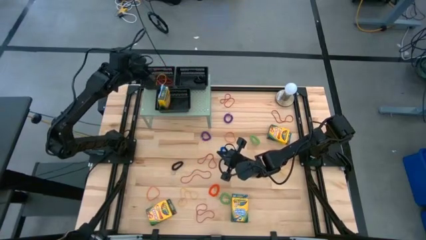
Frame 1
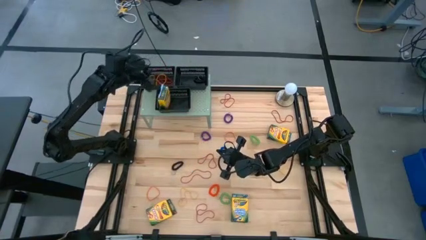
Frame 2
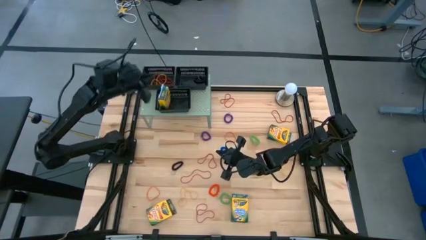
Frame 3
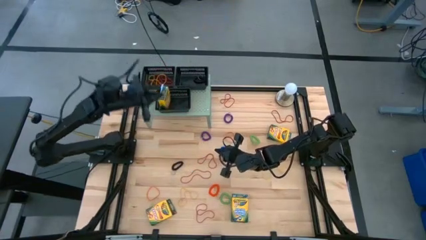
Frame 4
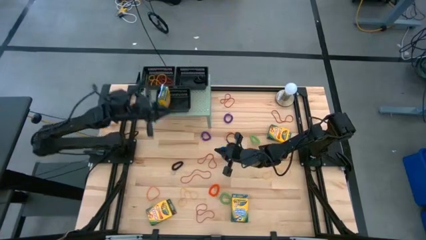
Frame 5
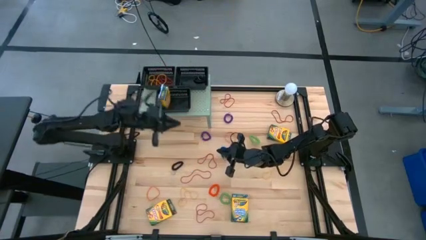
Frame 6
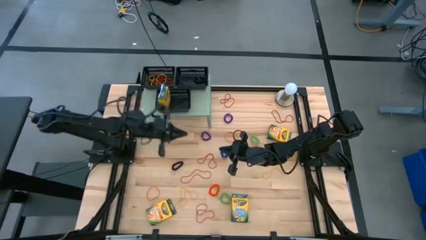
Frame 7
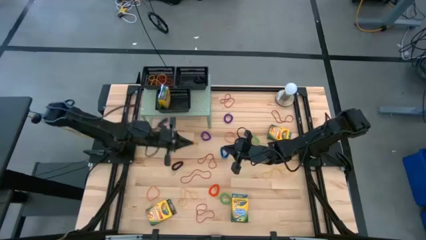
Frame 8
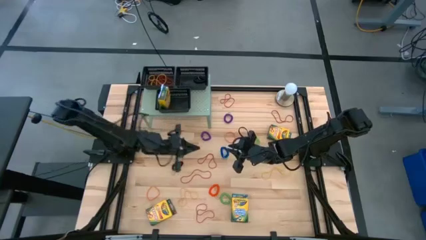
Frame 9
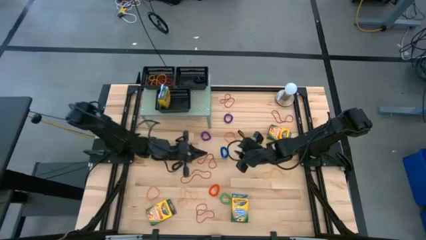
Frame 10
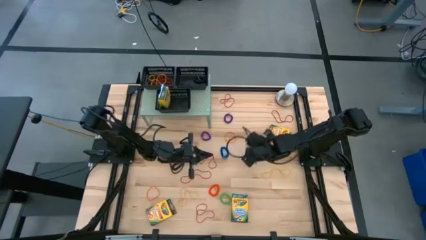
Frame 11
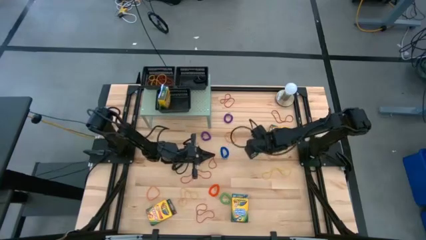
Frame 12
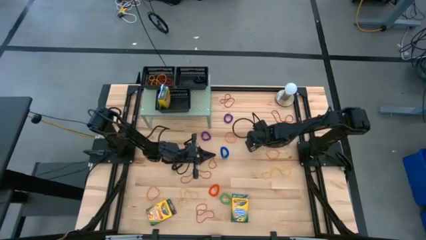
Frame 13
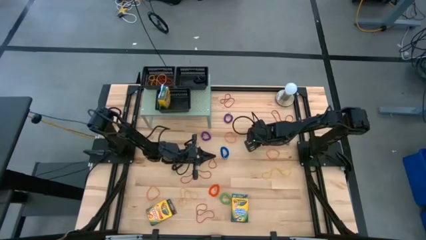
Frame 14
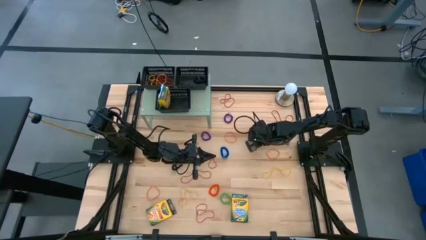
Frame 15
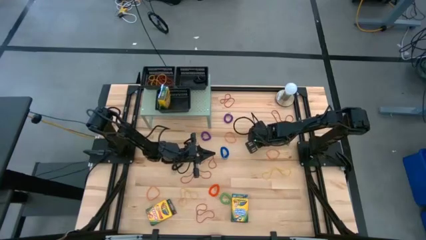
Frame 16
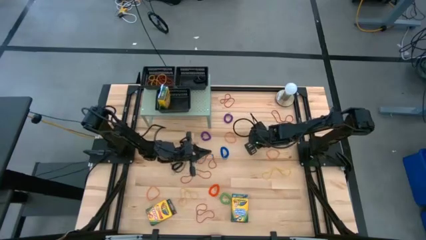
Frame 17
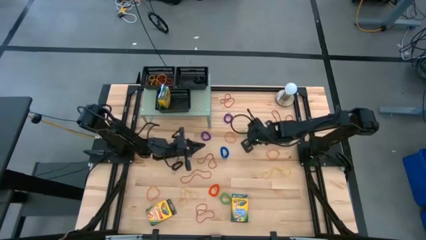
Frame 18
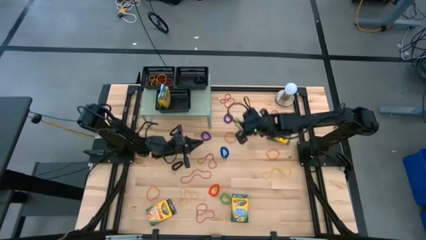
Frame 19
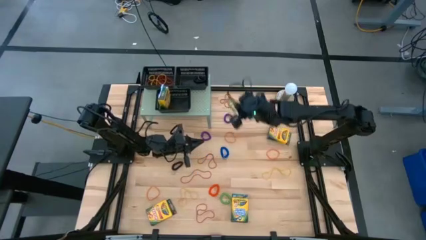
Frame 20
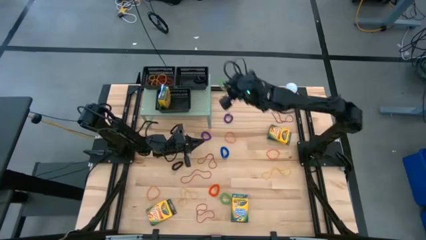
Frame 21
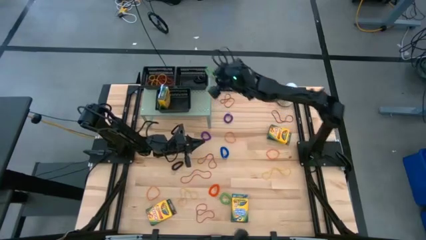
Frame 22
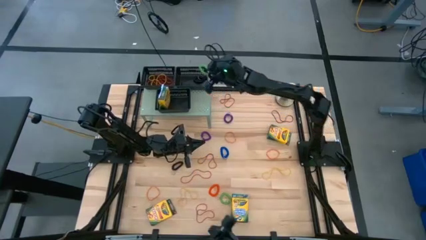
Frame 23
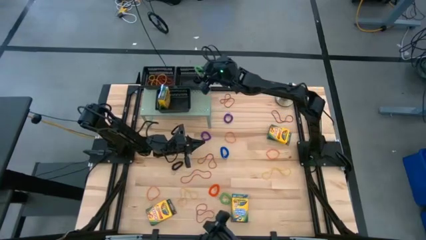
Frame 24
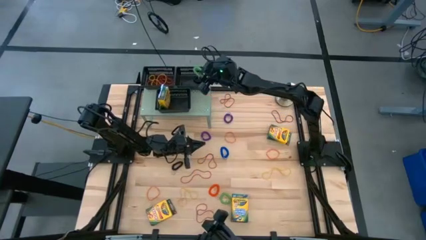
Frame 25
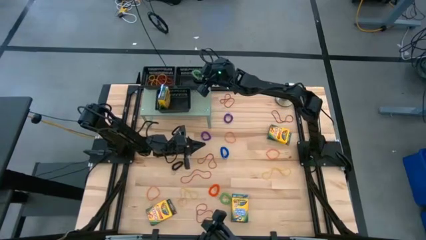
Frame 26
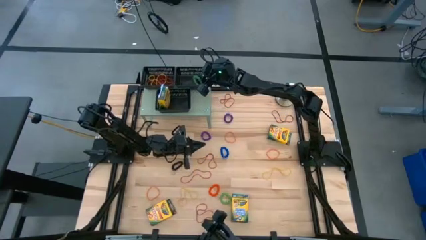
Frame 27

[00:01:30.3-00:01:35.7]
Task: Pick & Place Office Desk Supplies
Put the green spring keychain into the top right black bin on the shelf

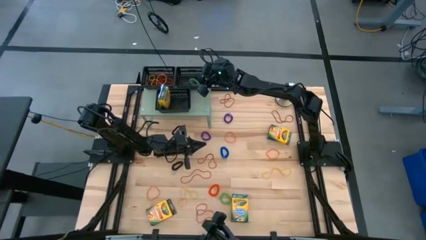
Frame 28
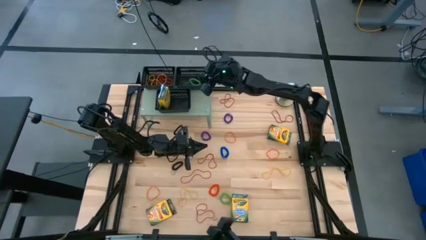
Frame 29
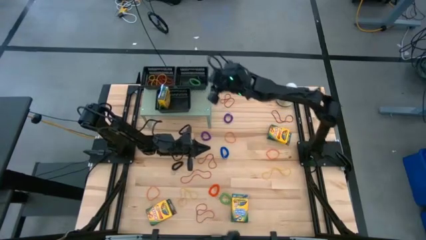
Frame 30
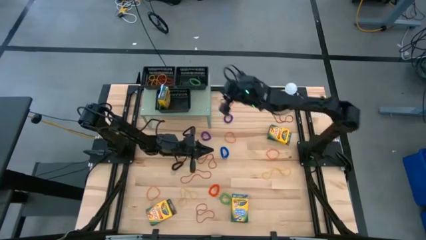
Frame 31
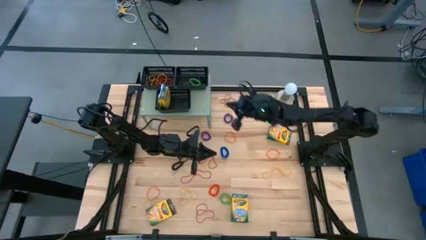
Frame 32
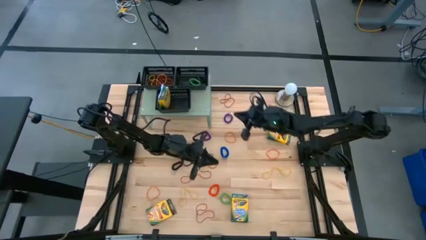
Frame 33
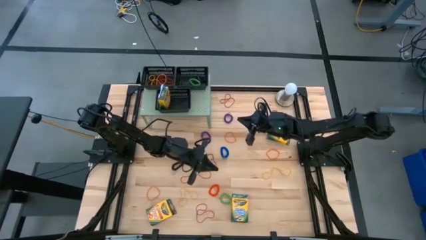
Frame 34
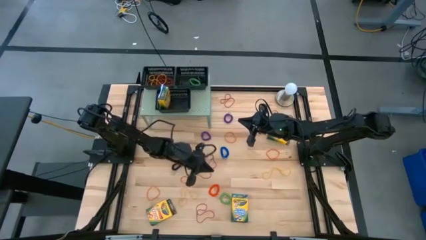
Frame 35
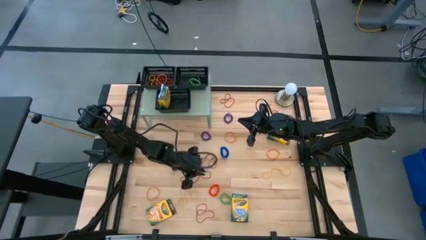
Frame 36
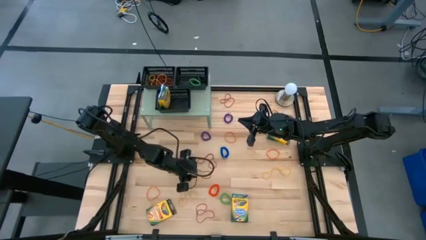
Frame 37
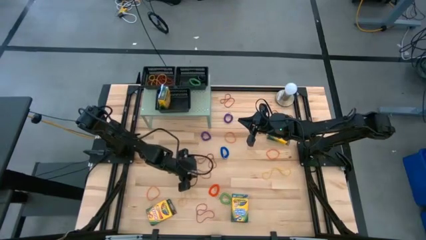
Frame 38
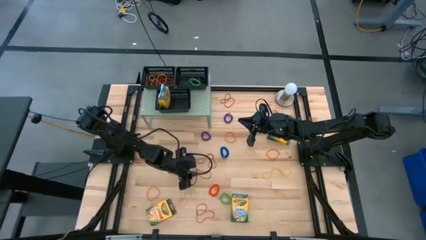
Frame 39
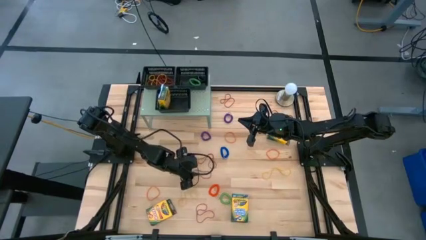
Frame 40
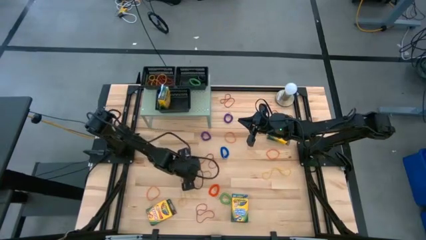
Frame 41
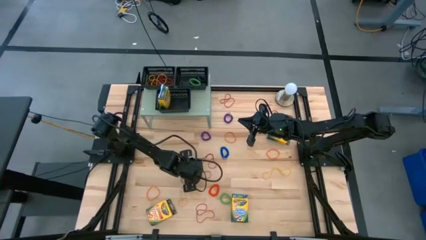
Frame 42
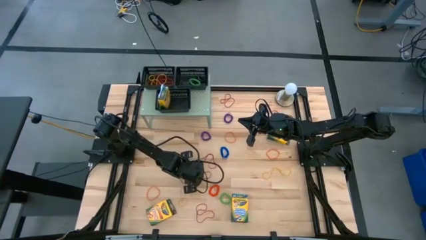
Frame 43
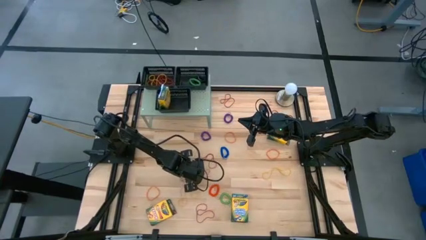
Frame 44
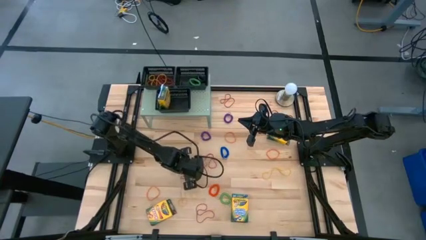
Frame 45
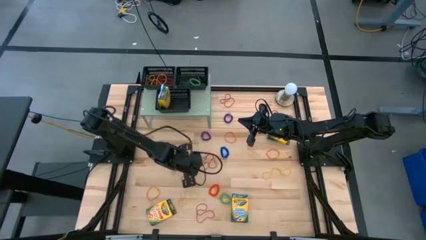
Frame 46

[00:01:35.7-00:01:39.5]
Put the red rubber band into the top left black bin on the shelf

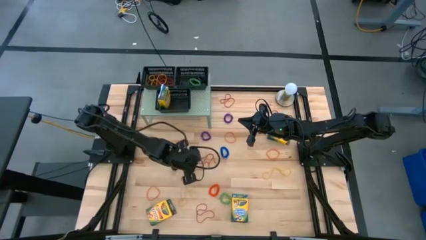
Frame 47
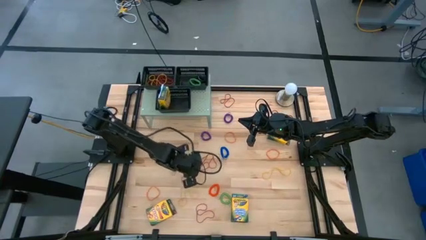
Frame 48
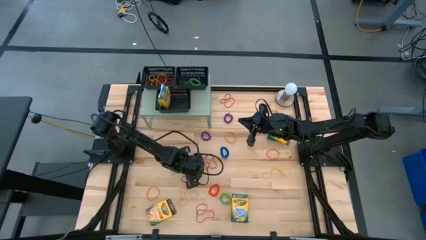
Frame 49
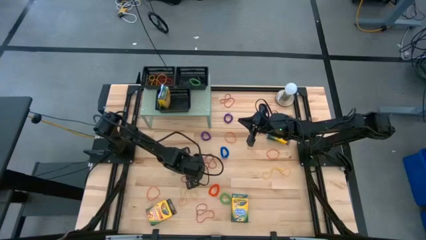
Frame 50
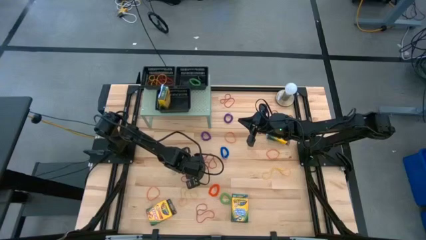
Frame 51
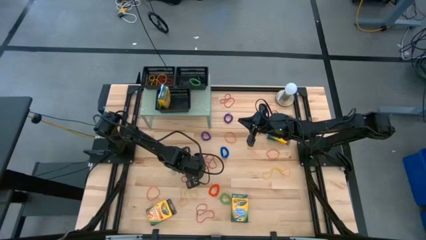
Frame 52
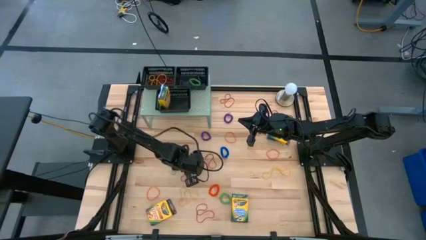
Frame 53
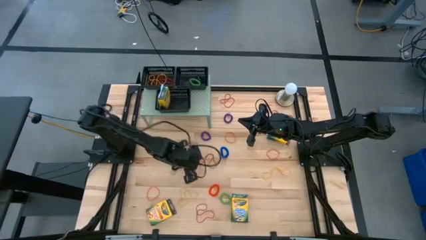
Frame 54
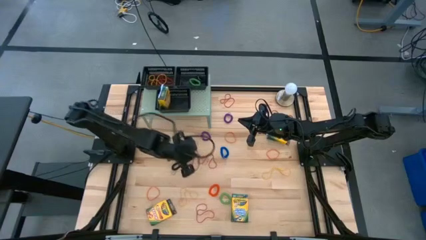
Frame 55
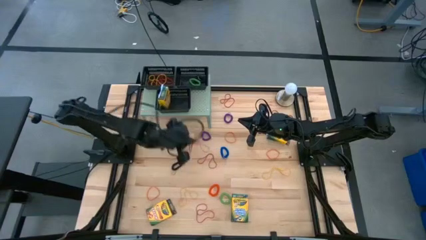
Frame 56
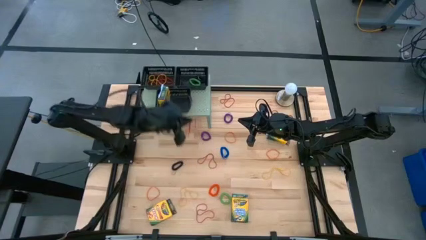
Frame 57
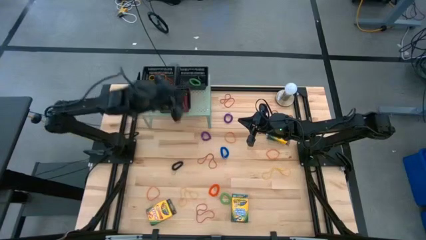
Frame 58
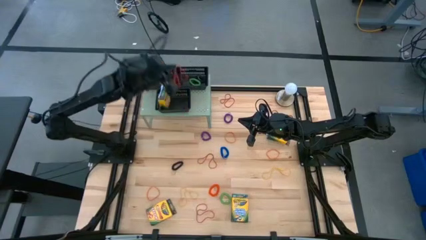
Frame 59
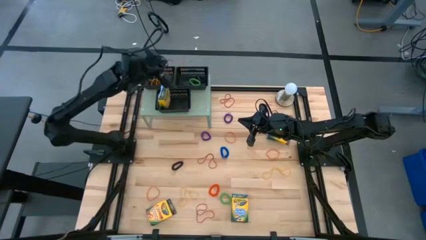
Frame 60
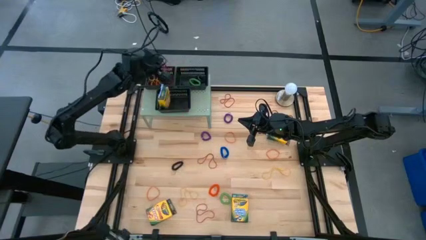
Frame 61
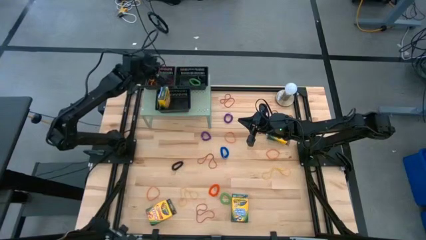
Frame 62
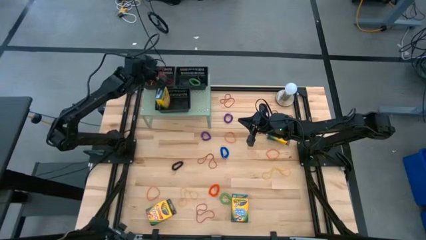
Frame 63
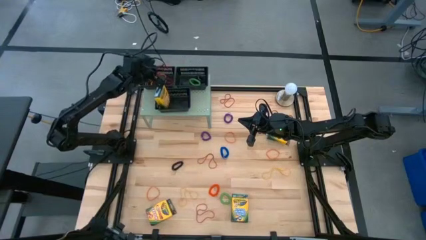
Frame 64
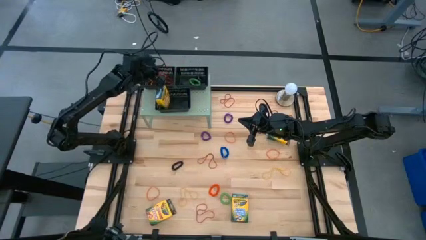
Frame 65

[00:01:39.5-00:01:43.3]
Put the red rubber band into the top left black bin on the shelf
